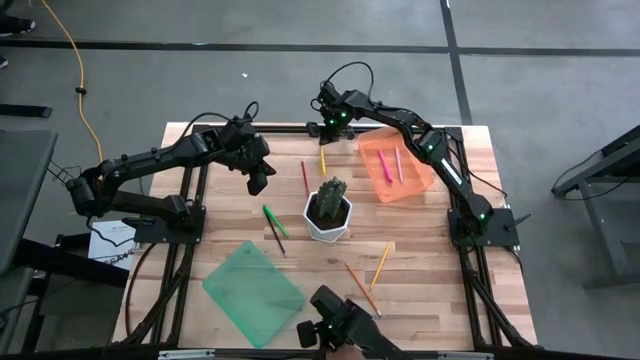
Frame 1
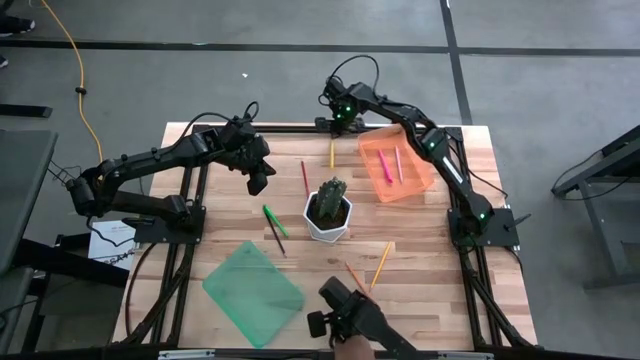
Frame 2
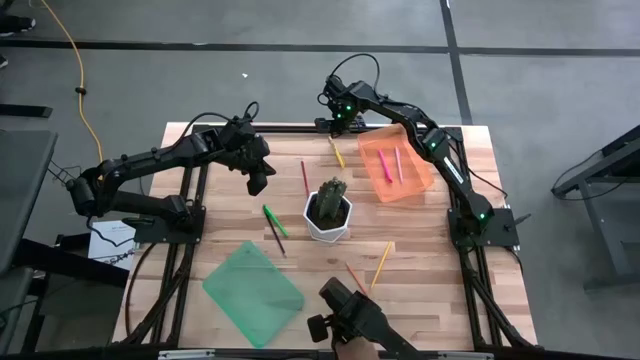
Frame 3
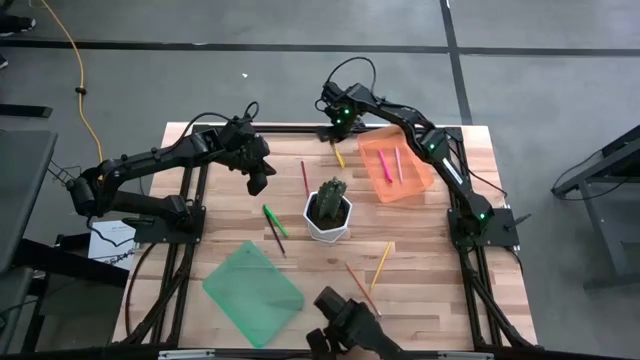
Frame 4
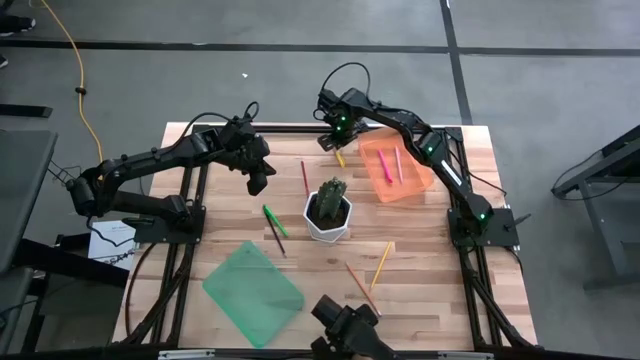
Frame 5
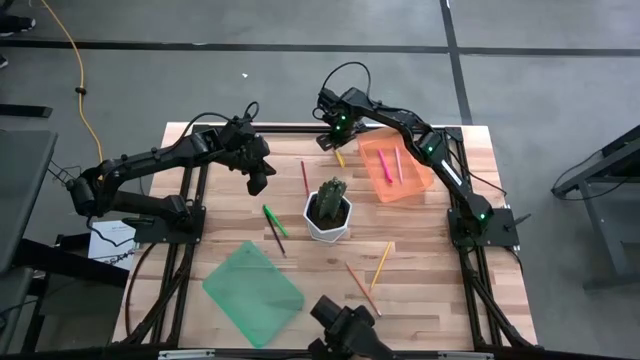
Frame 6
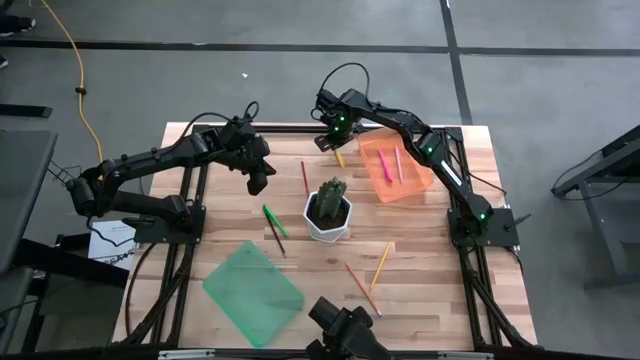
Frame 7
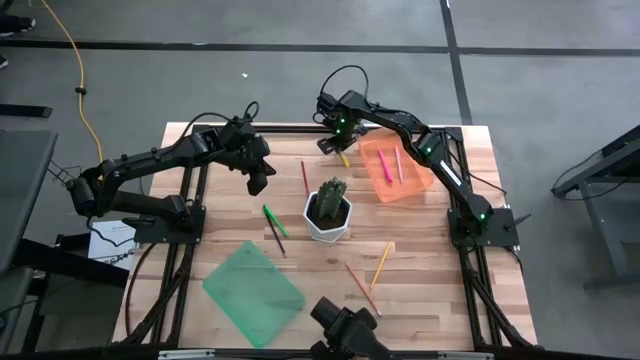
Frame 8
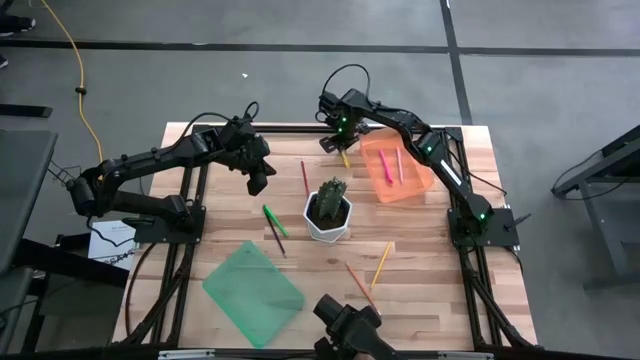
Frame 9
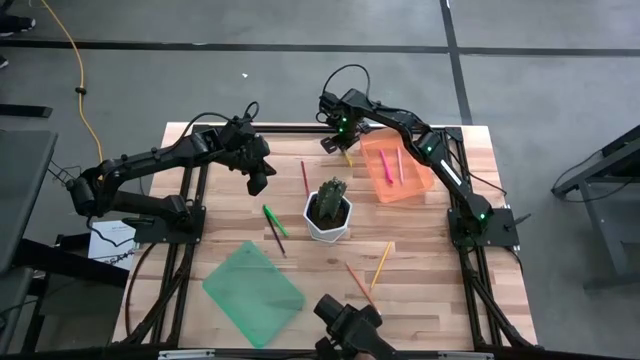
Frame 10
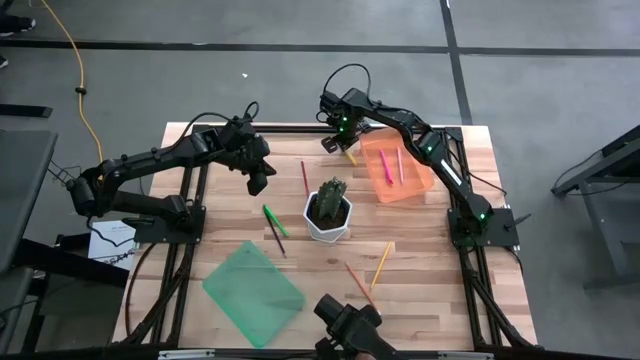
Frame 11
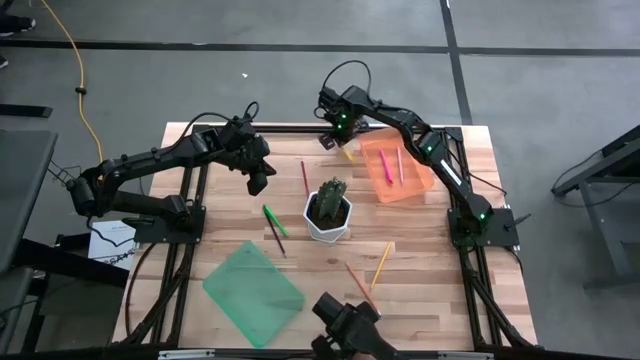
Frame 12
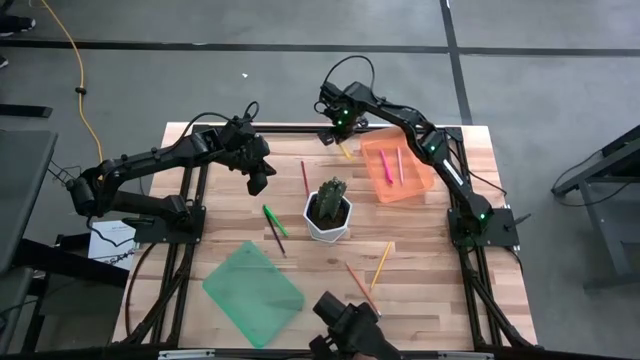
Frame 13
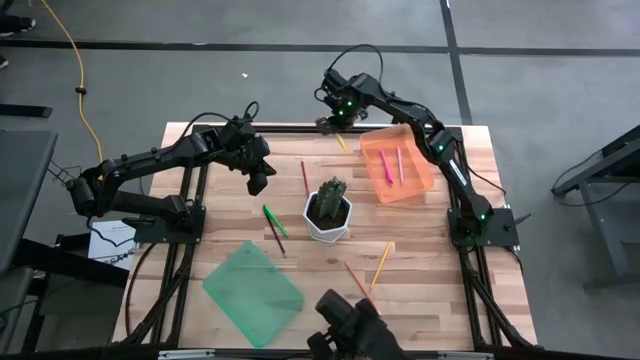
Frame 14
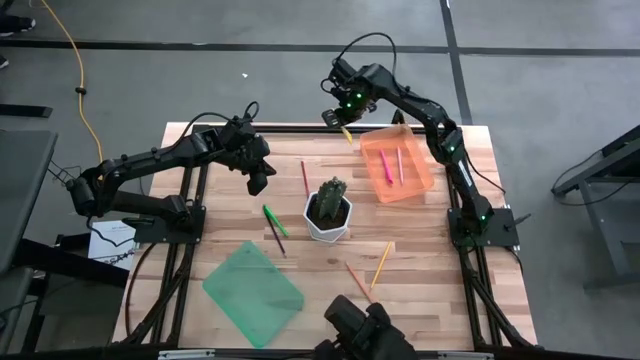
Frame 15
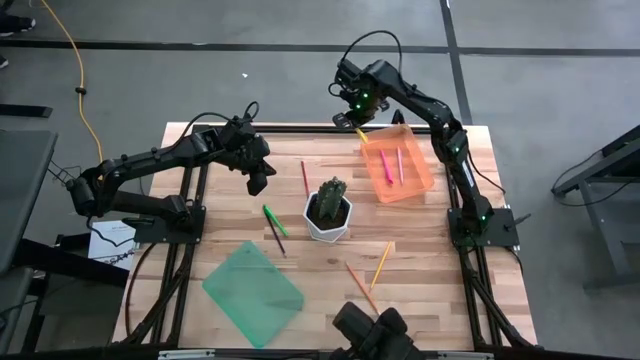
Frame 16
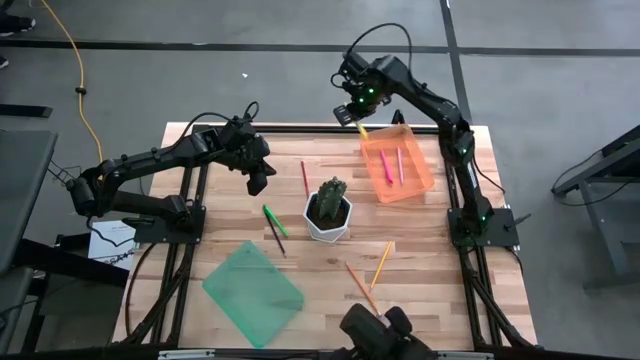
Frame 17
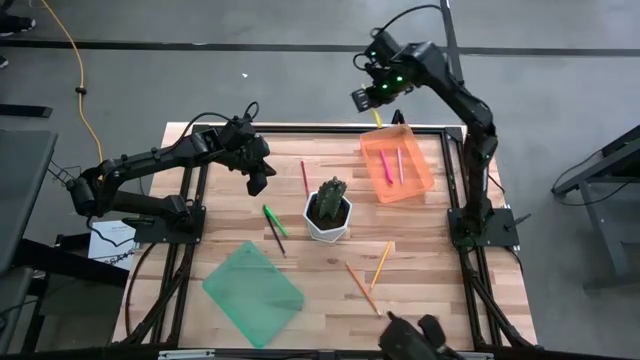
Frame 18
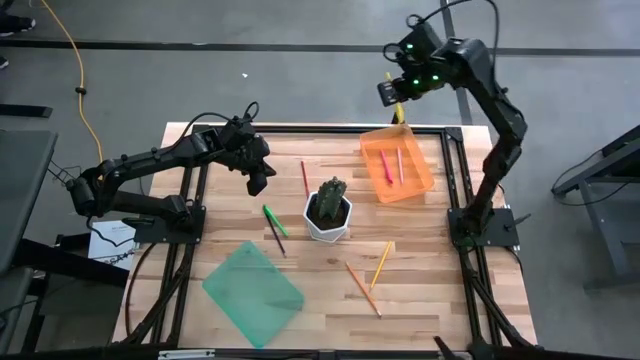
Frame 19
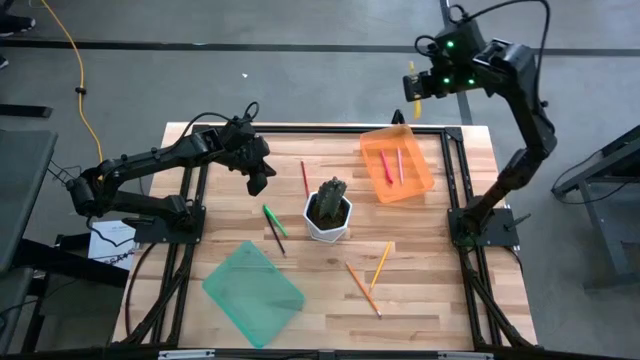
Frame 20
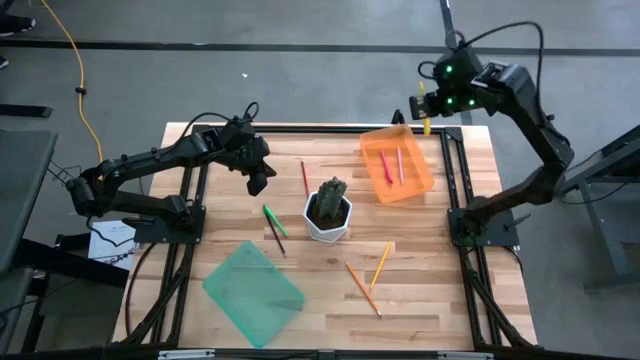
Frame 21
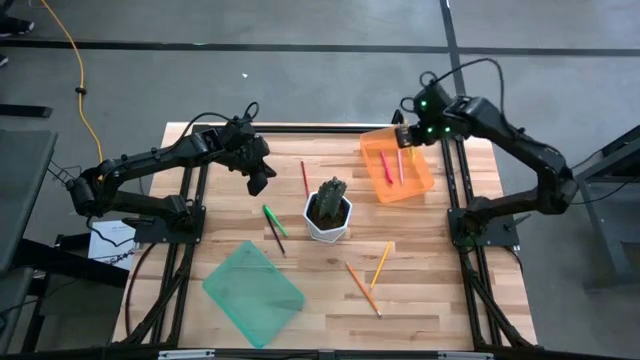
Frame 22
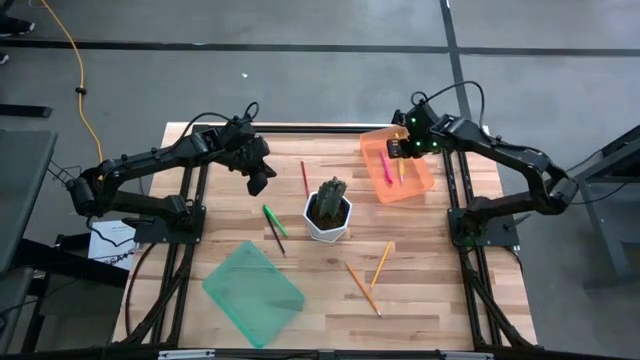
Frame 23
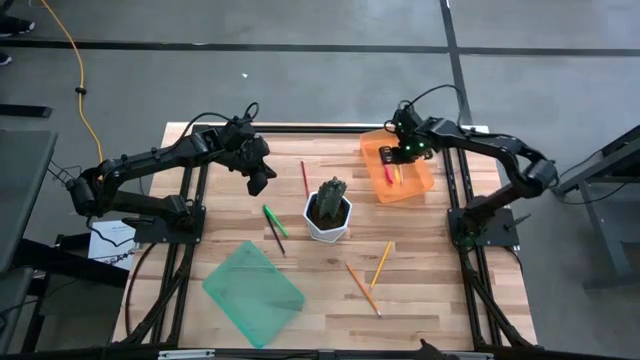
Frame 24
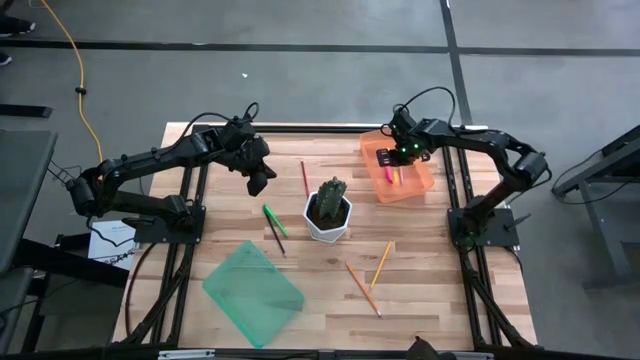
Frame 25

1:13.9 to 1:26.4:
Task: Sort pens & pencils
Put the yellow pen into the orange bin

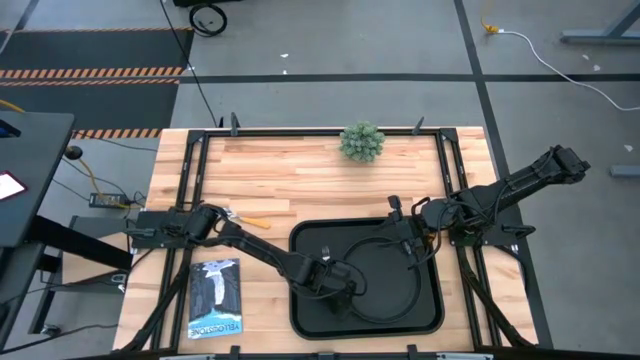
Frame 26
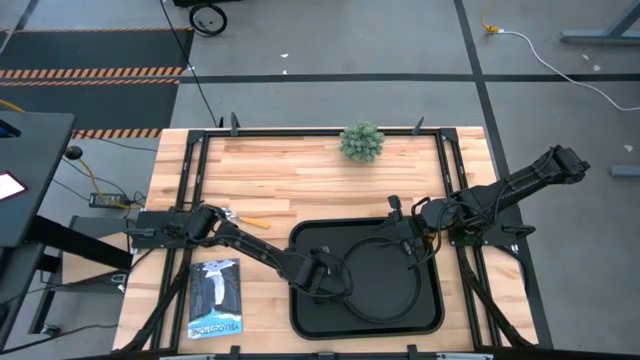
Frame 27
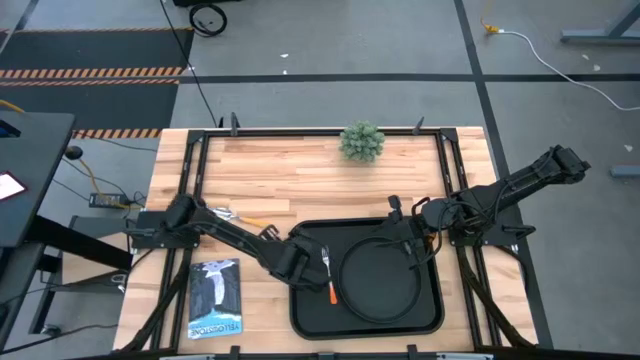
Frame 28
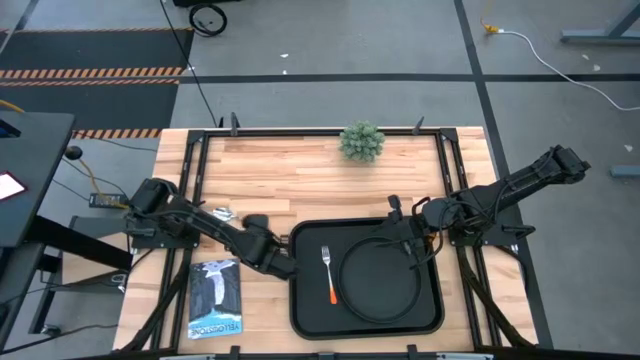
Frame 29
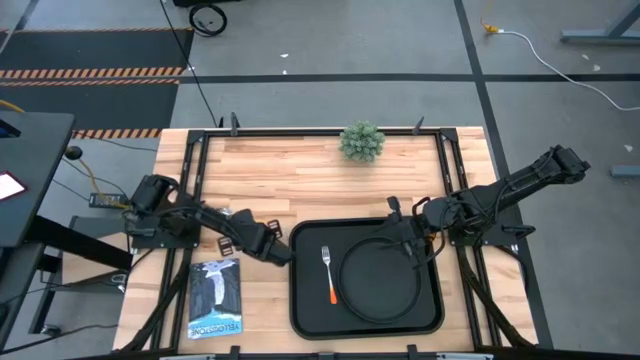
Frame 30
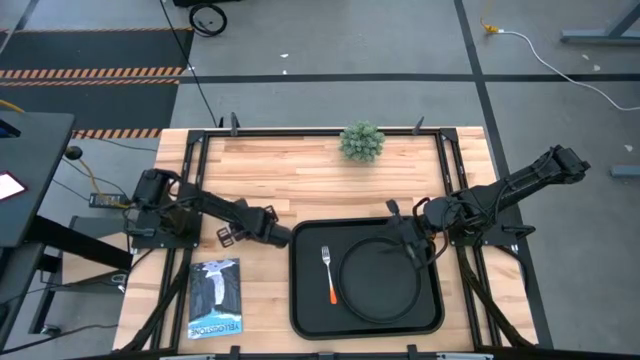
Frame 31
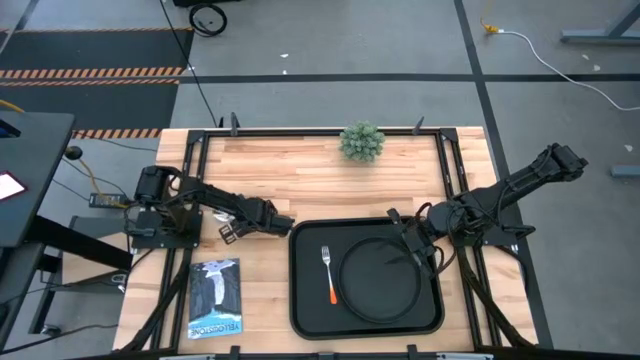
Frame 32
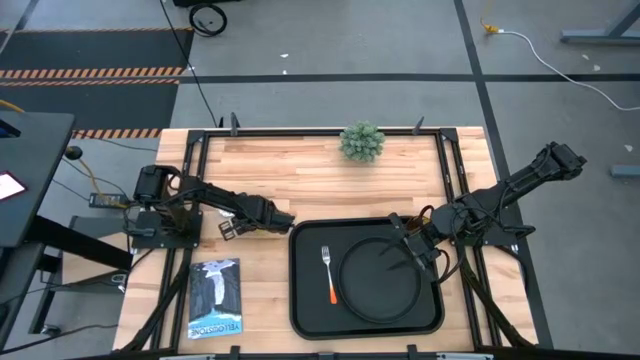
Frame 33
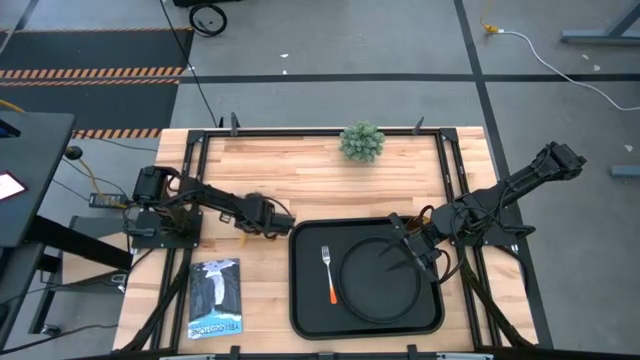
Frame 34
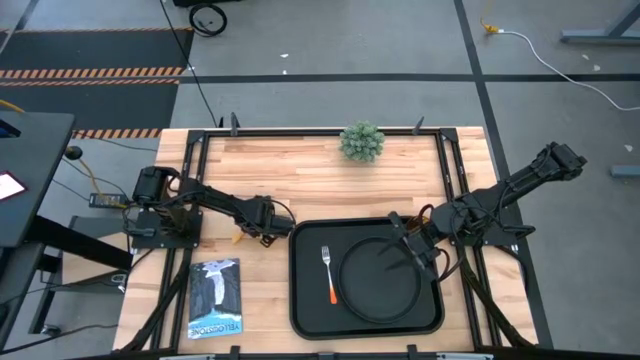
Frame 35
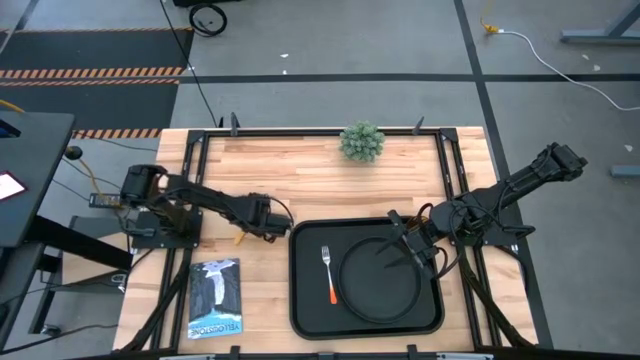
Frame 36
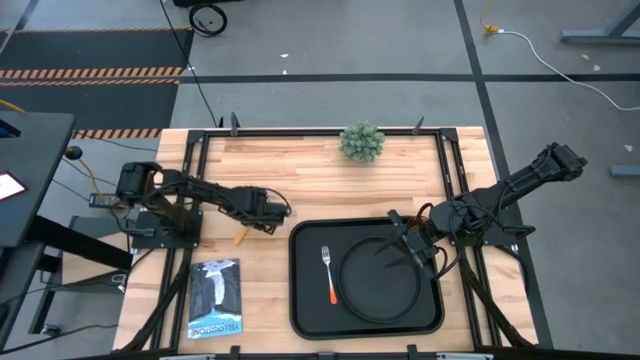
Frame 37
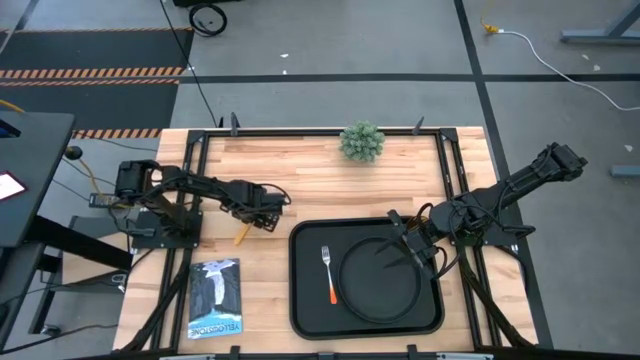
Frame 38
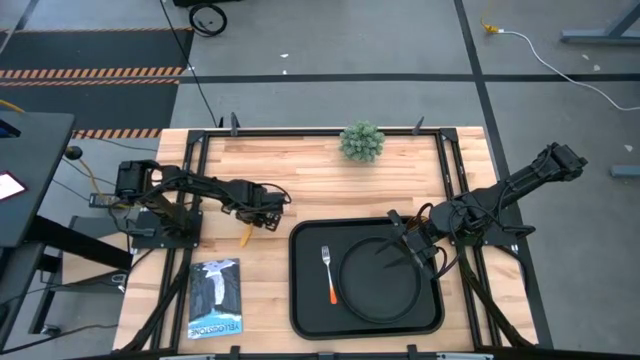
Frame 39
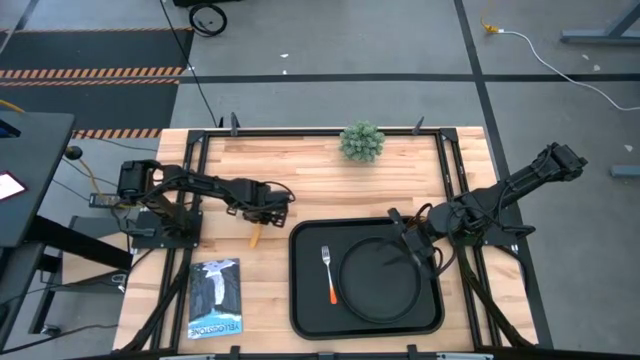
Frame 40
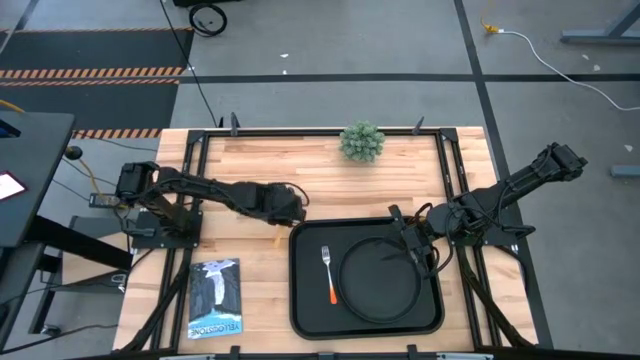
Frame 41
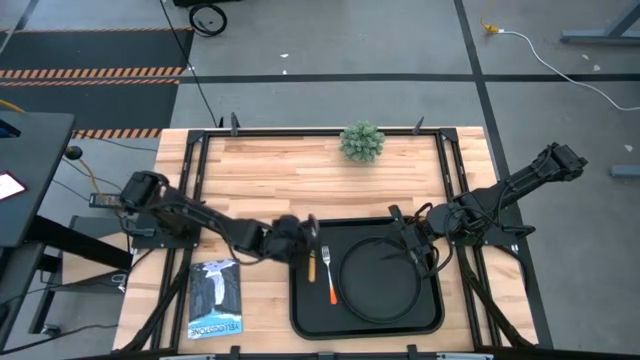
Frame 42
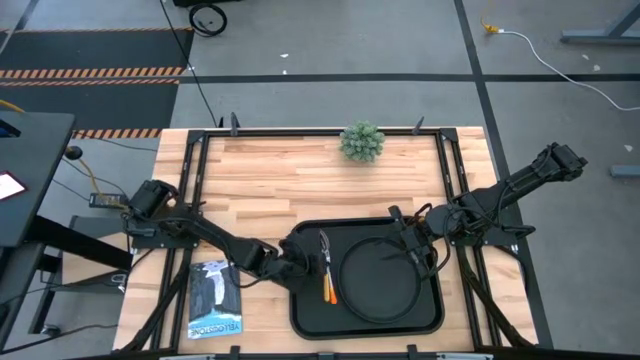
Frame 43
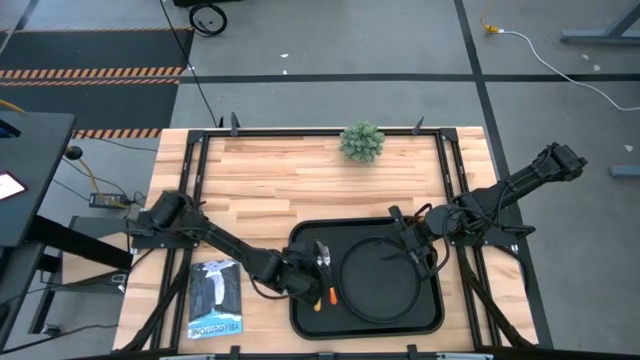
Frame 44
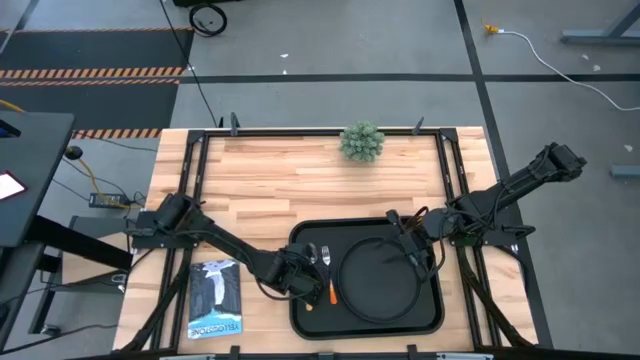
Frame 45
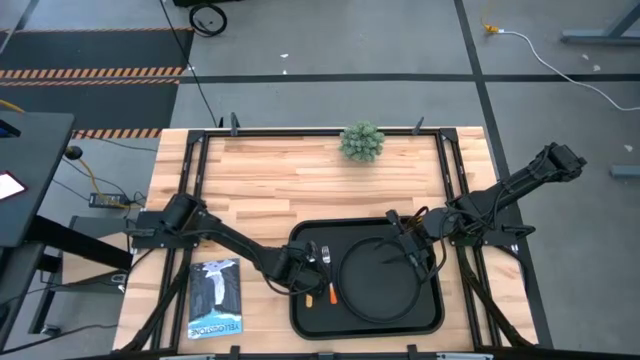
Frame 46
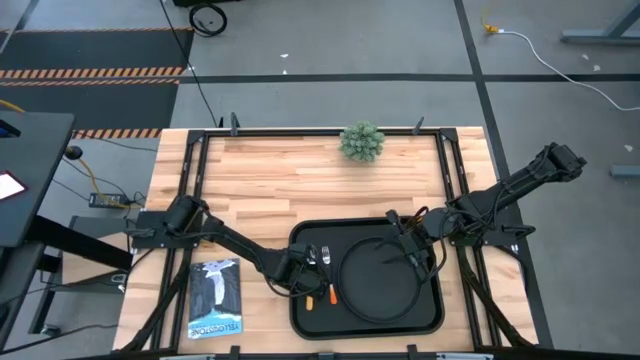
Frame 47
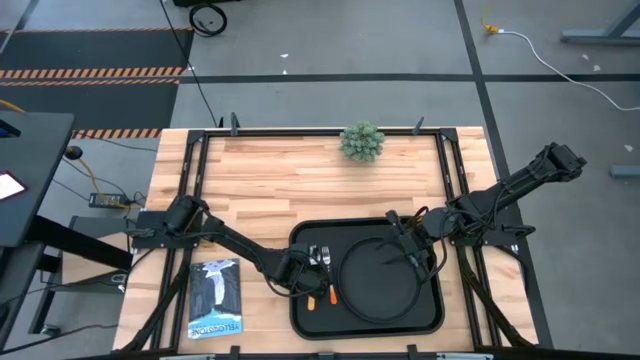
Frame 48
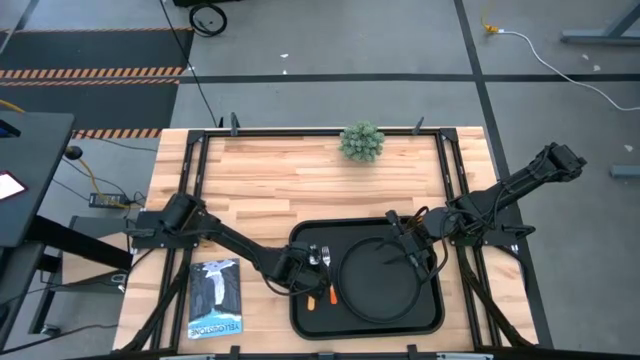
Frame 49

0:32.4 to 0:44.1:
Task: Pick and place plate/cup/fork/spoon on tray
Put the orange spoon on the black tray to the left of the orange fork
